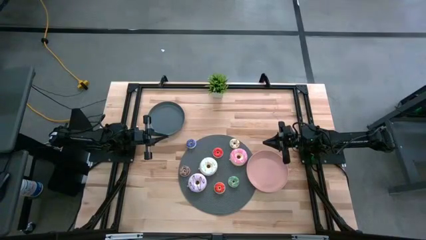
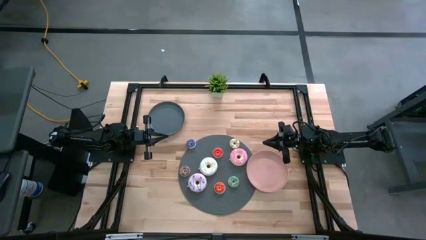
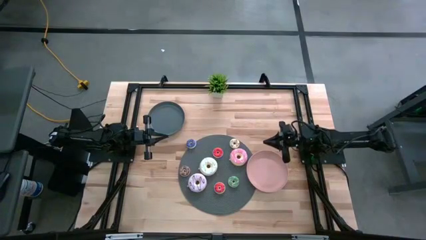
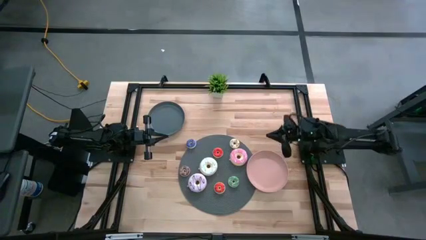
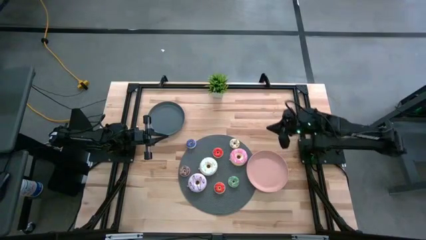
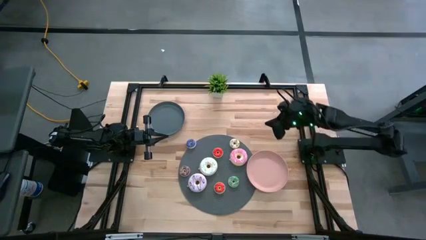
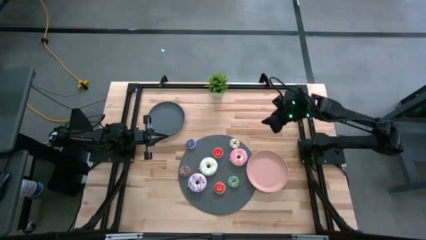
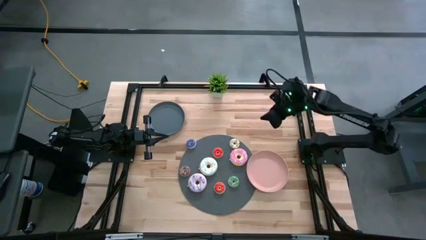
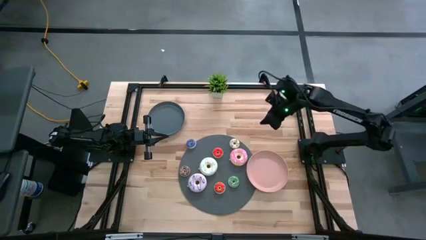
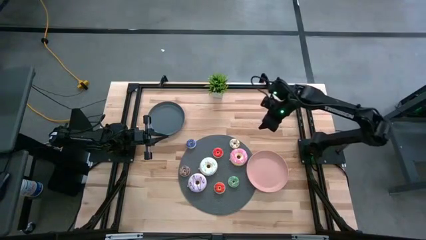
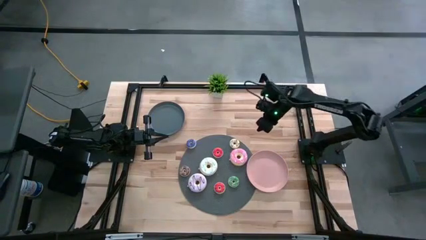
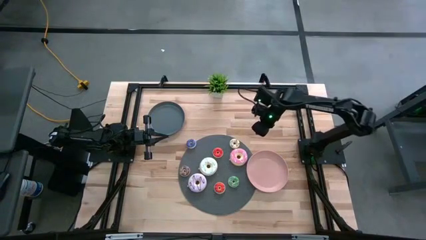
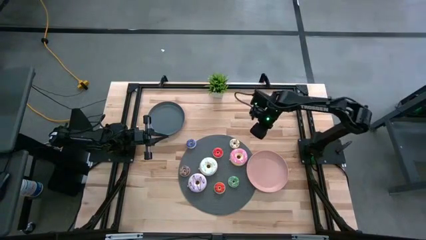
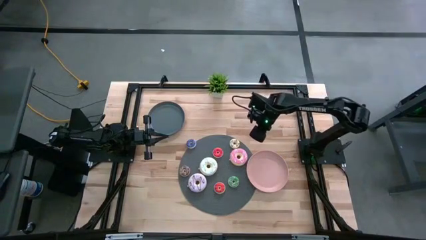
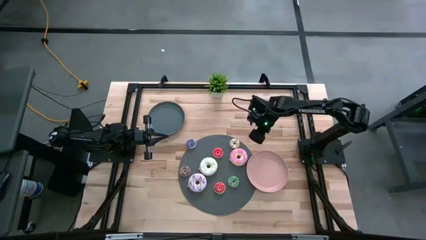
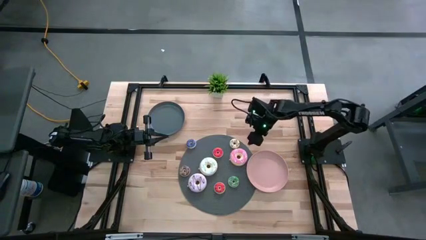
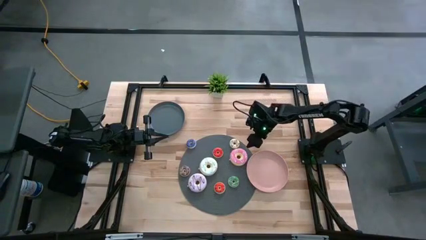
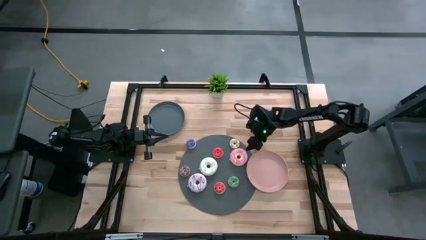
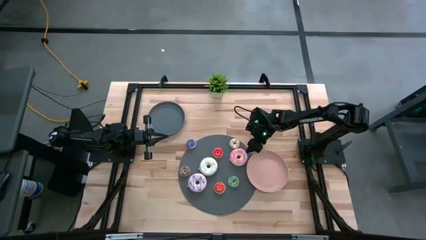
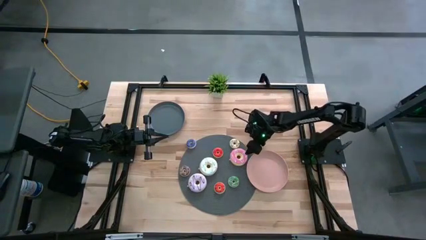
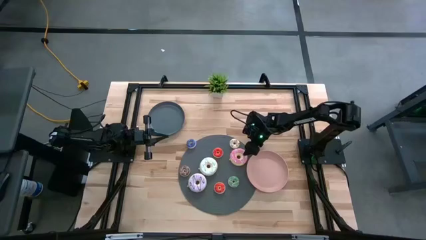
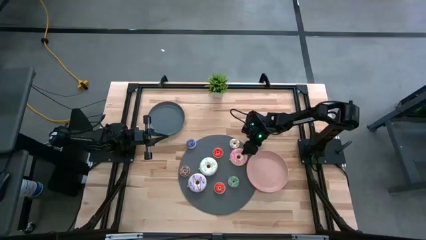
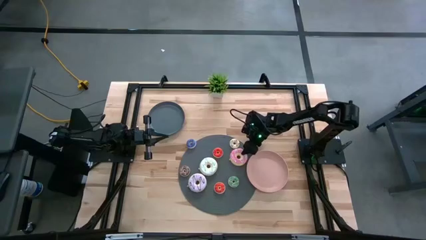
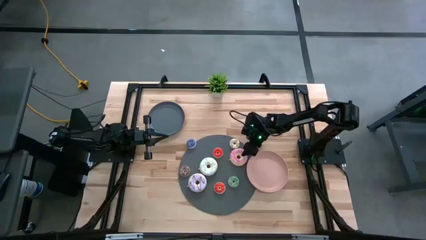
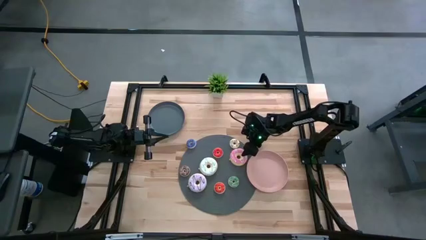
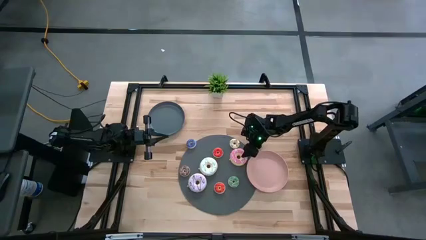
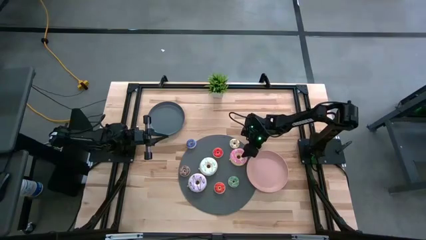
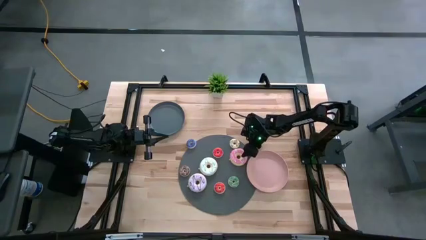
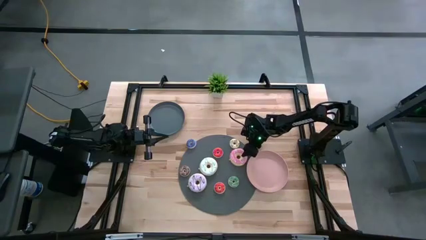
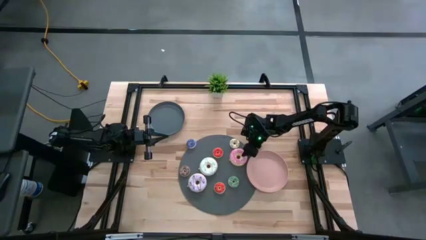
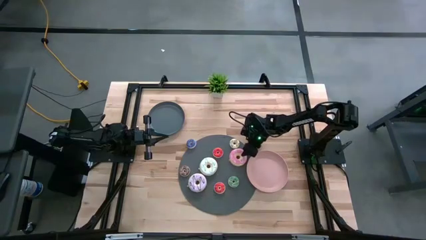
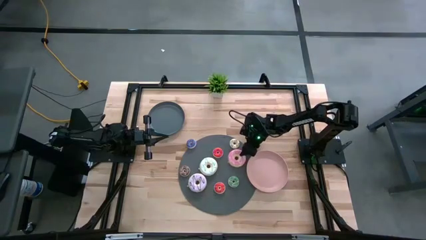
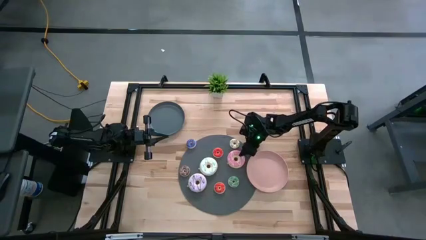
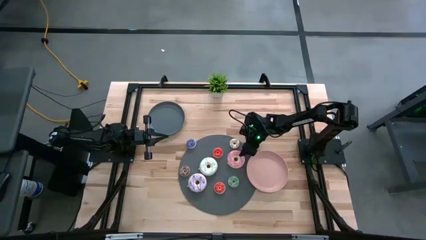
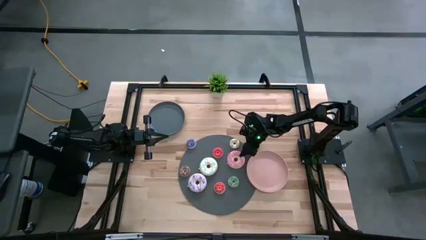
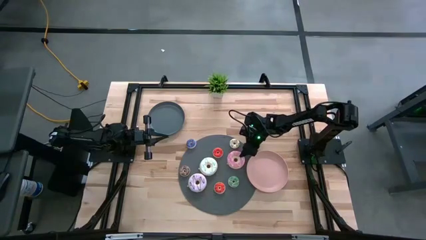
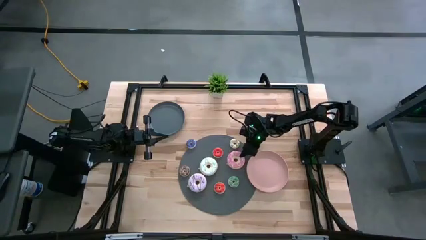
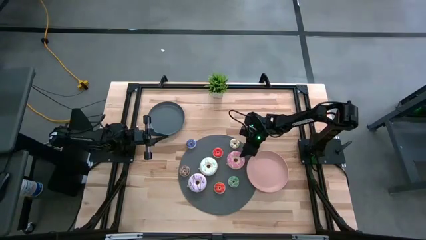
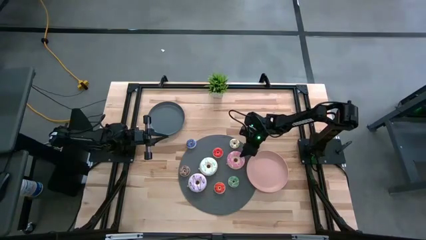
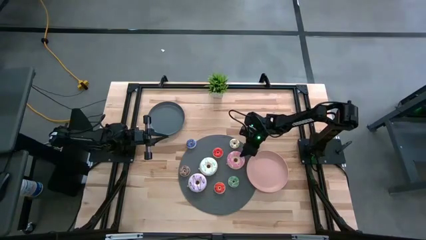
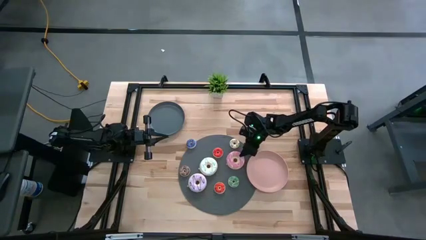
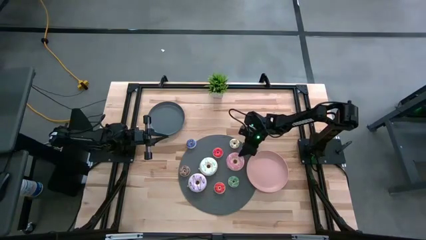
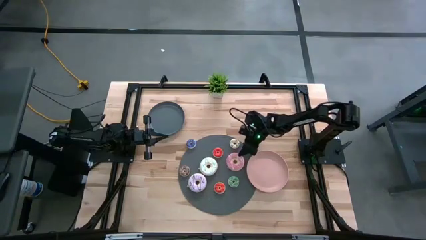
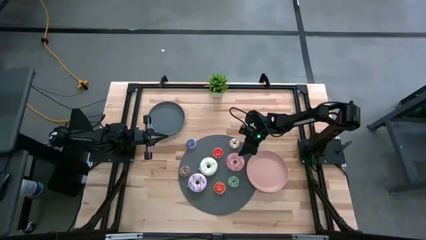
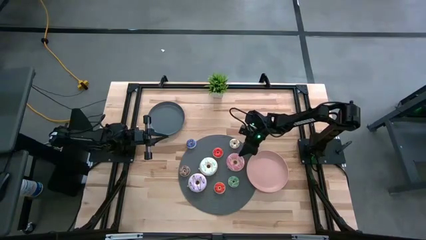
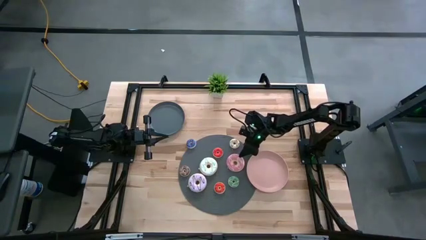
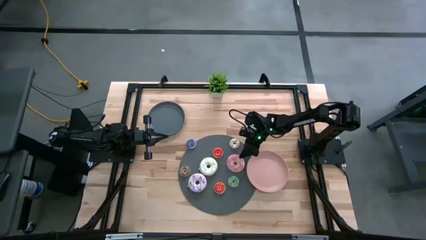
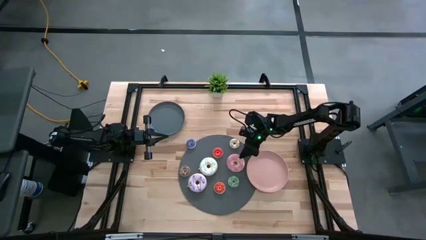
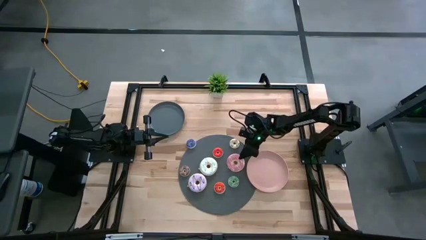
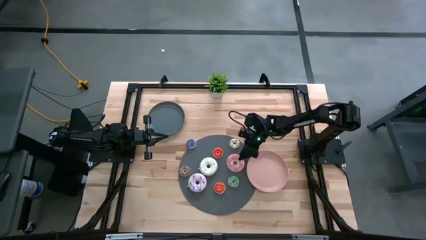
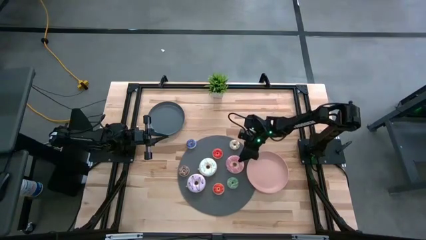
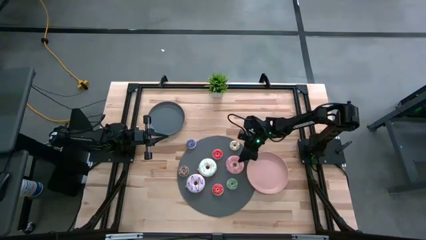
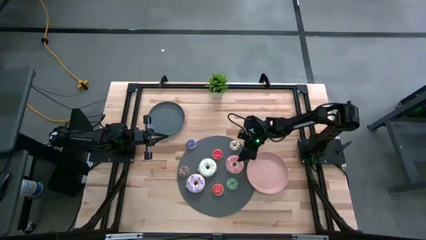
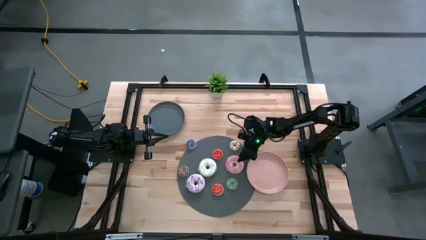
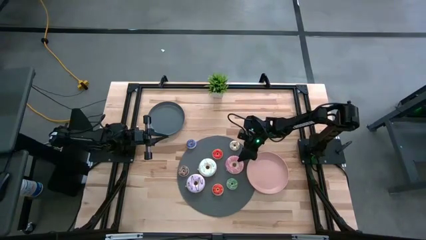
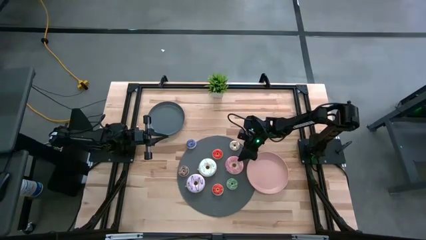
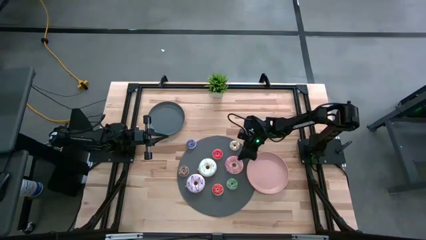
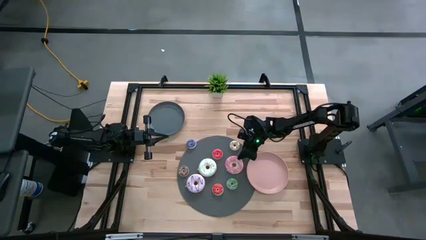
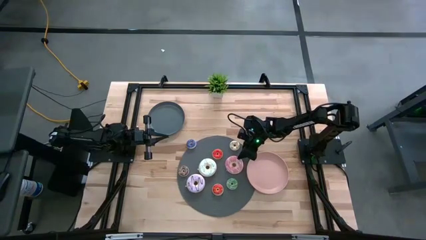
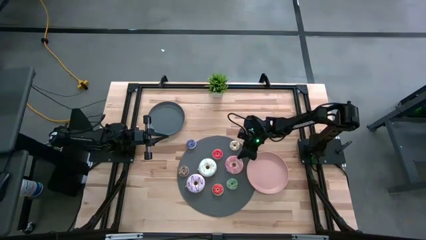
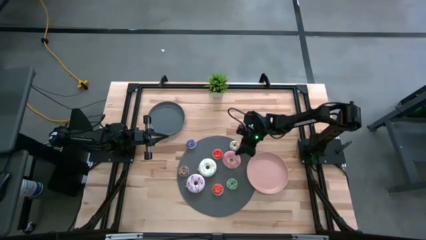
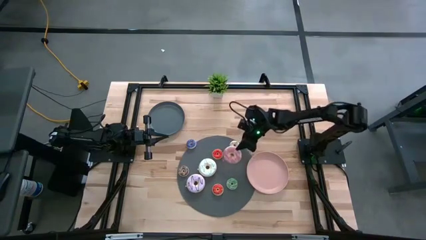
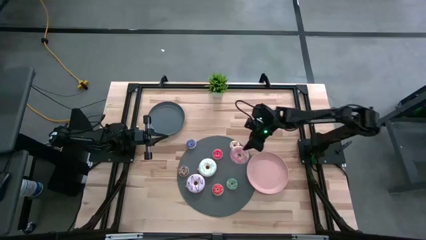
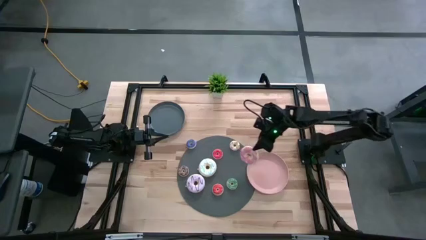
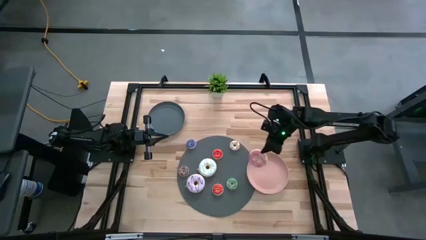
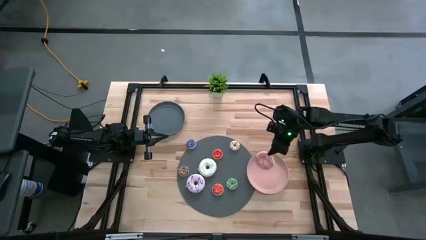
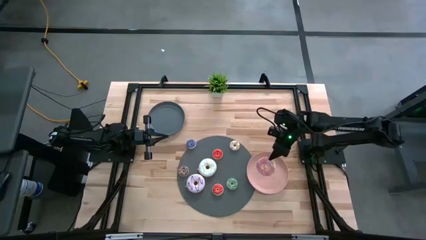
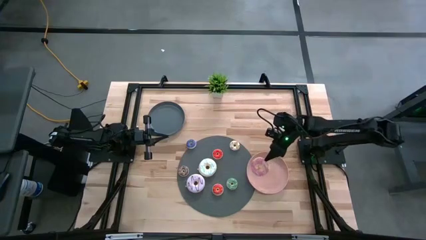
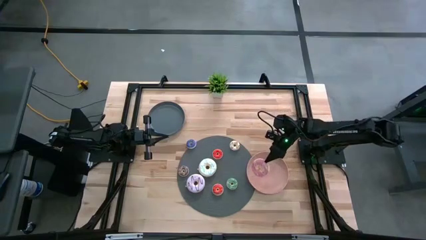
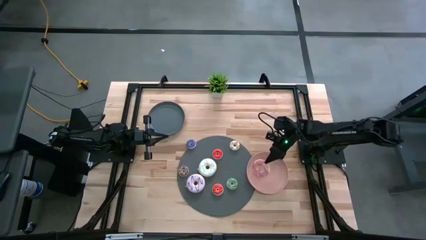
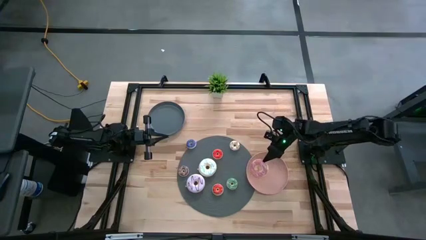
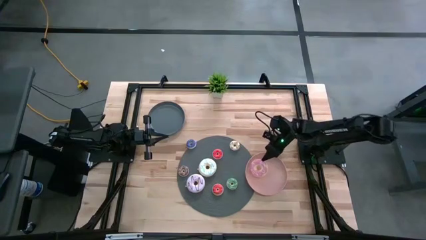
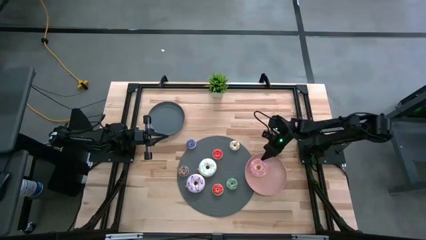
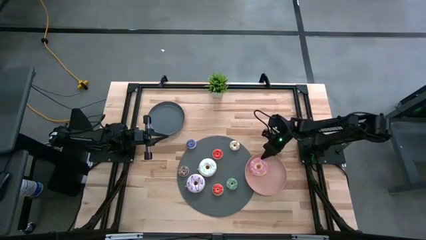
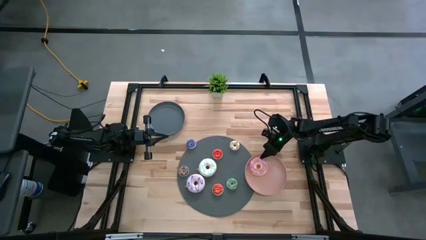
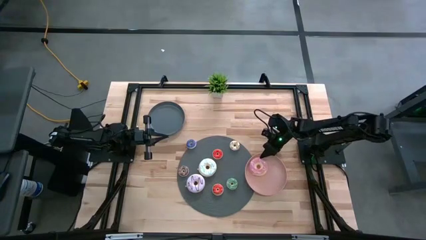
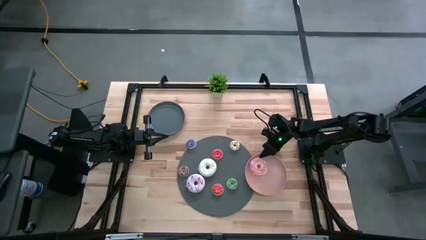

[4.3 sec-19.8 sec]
Task: Pick & Place donuts
Put the big pink donut on the pink plate
